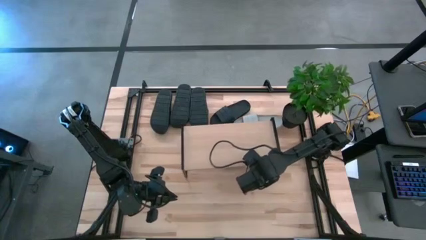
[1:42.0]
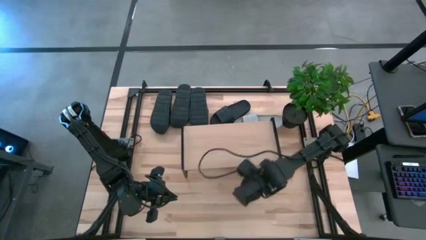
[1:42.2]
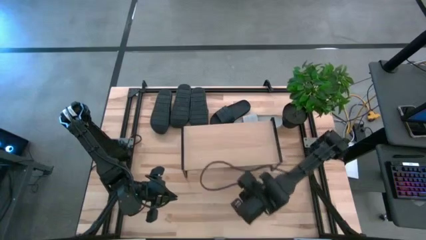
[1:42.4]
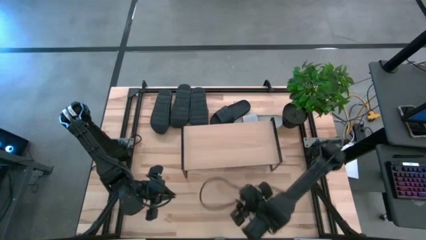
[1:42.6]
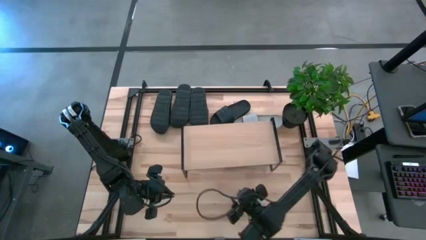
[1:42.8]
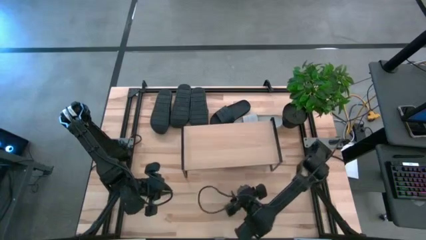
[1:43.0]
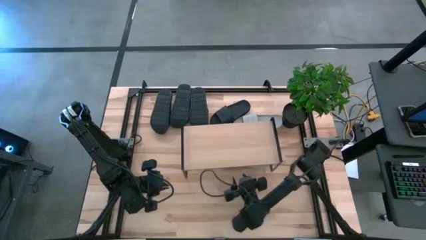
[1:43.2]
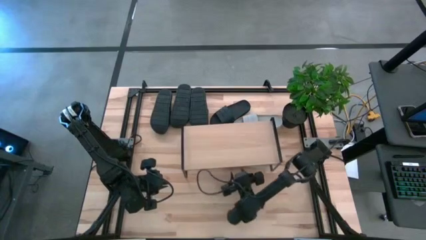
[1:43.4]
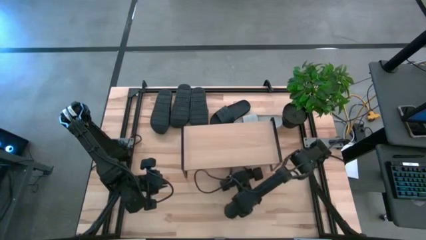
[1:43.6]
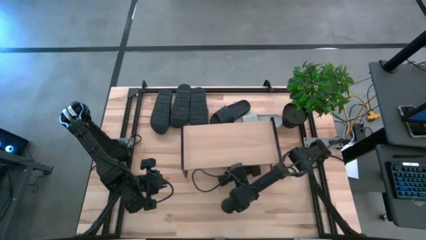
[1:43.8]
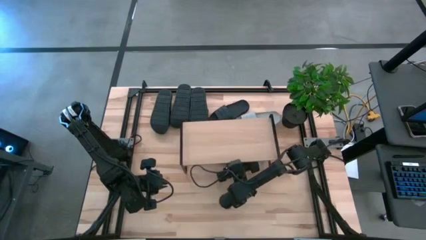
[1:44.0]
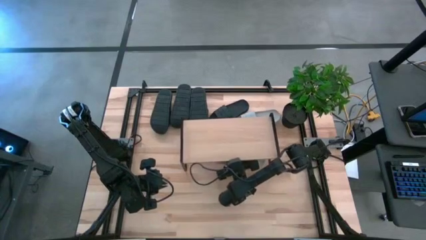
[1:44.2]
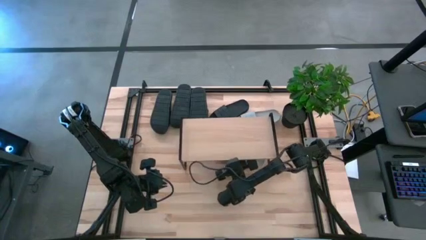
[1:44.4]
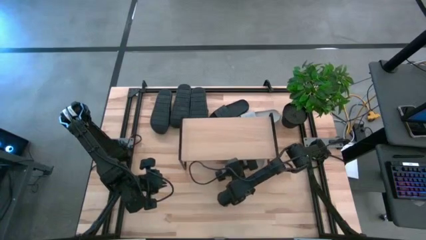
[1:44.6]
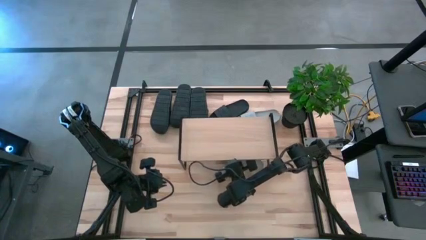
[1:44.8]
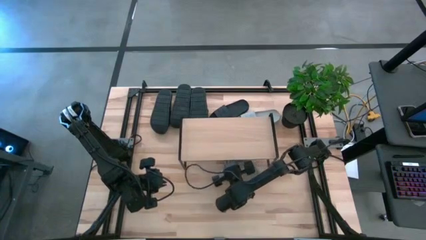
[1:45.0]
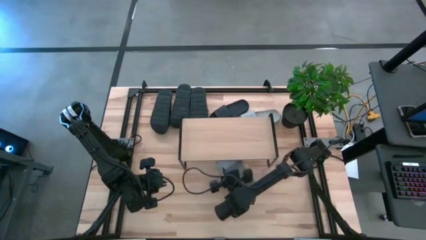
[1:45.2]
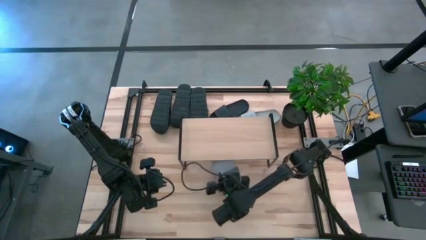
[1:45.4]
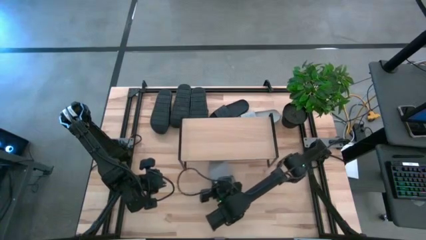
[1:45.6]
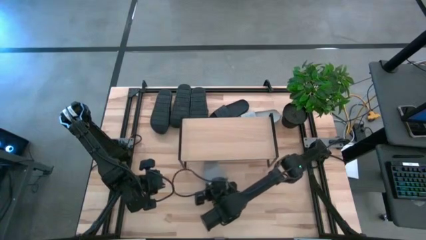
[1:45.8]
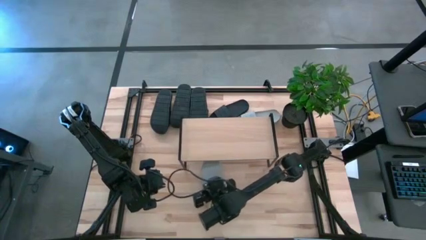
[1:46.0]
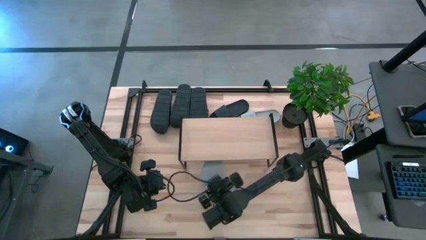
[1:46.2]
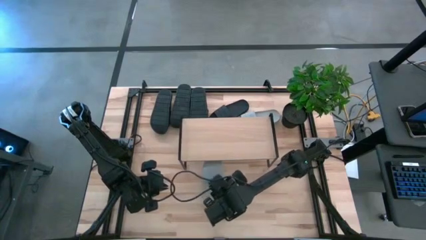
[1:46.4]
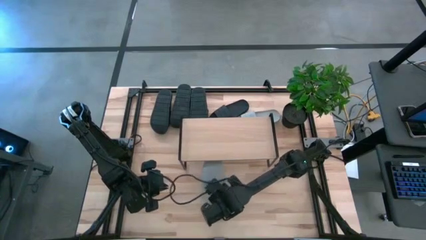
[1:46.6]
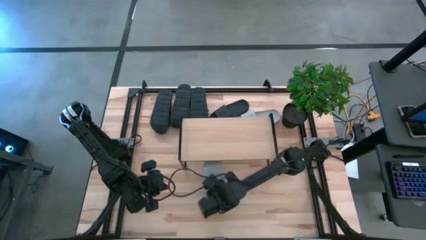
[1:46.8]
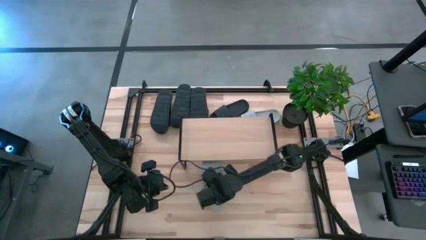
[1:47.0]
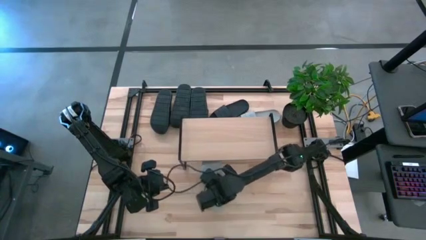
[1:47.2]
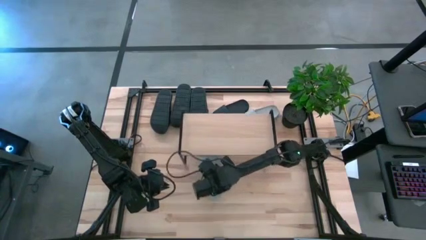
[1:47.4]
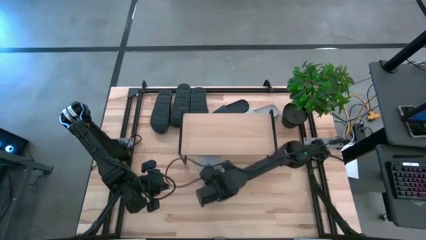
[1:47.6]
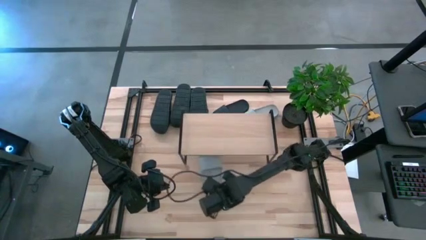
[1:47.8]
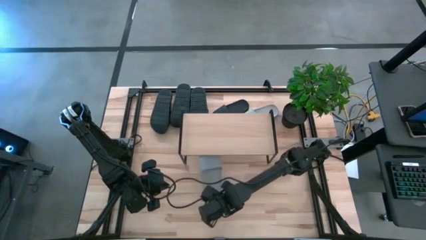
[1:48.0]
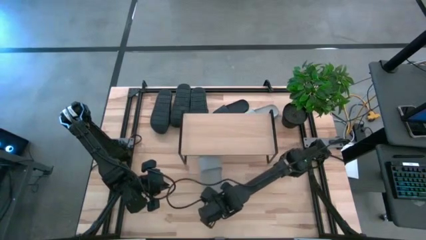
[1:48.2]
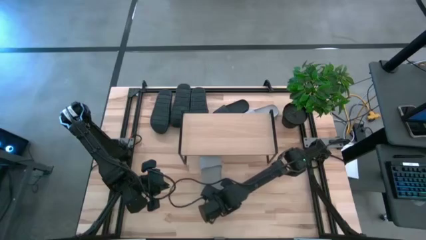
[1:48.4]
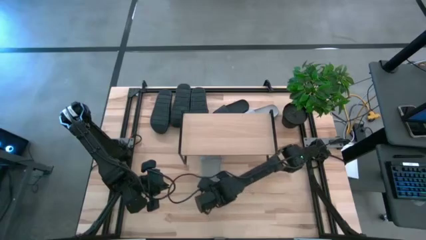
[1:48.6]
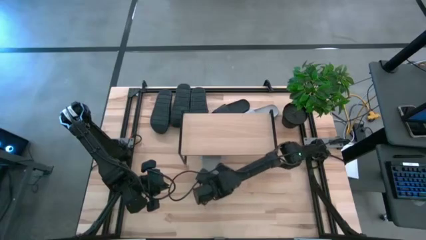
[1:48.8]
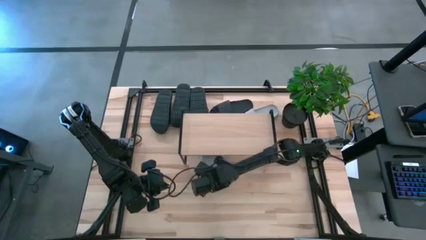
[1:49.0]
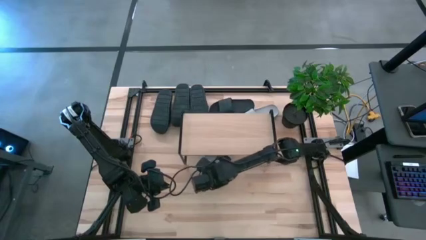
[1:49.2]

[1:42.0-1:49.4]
Task: Pick and place slides into the shelf
Put the gray slipper under the shelf

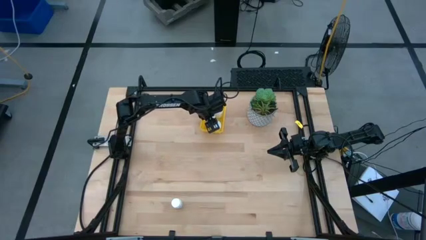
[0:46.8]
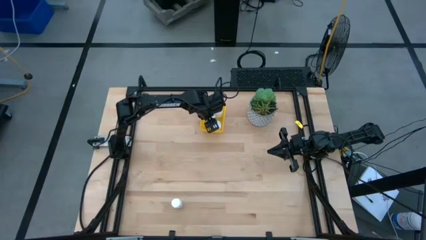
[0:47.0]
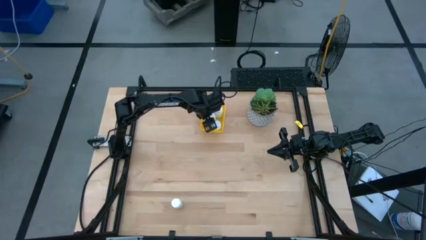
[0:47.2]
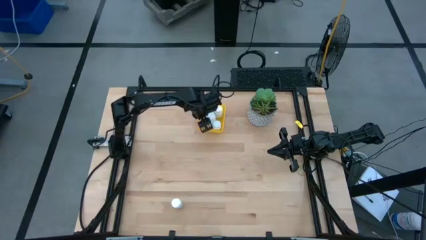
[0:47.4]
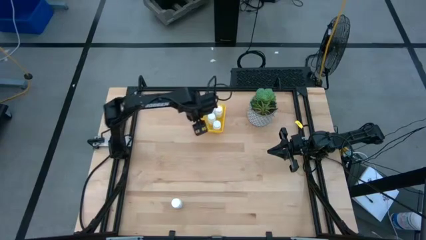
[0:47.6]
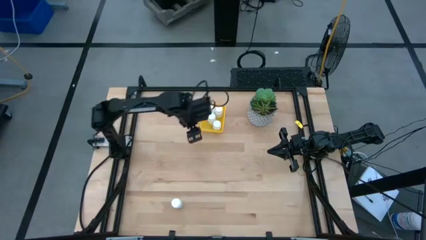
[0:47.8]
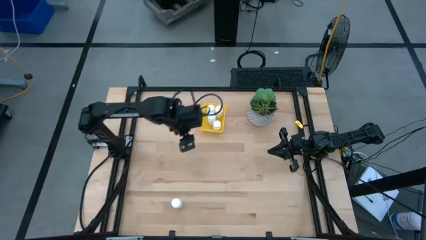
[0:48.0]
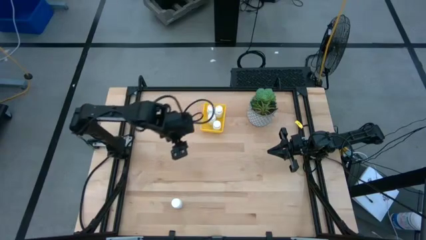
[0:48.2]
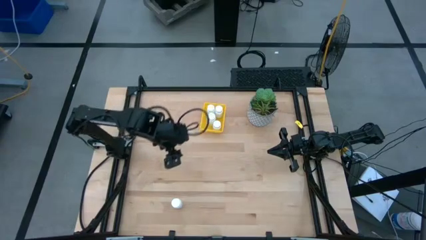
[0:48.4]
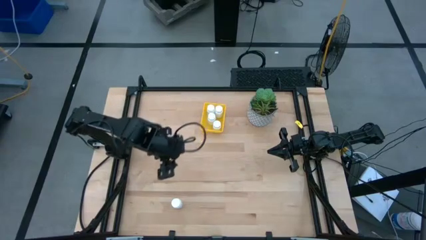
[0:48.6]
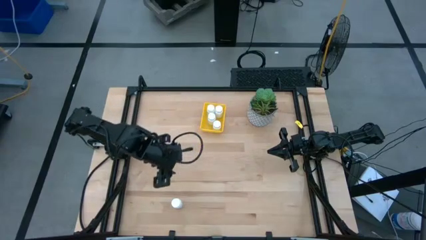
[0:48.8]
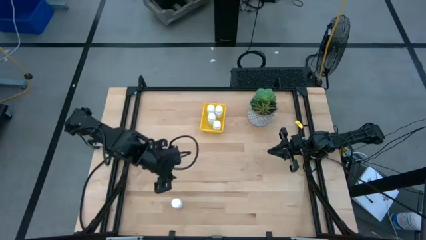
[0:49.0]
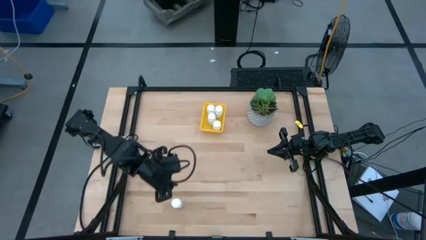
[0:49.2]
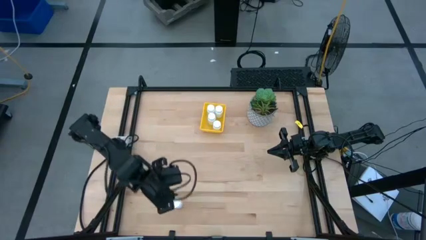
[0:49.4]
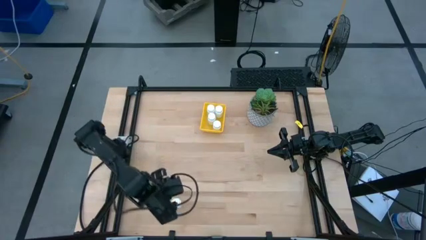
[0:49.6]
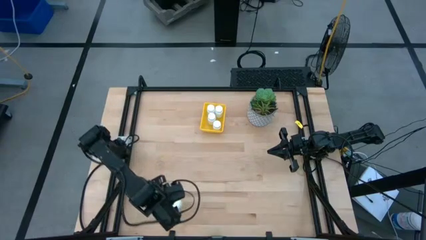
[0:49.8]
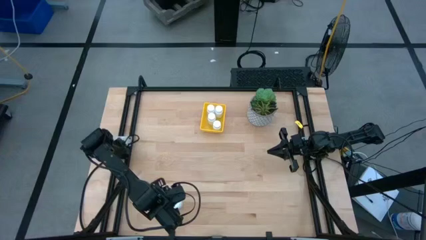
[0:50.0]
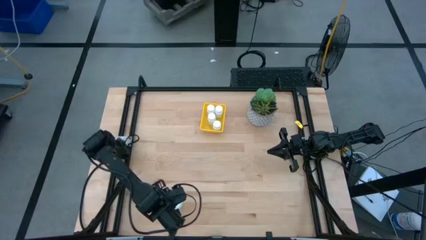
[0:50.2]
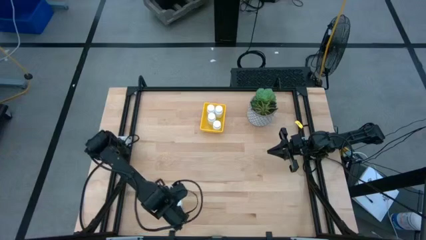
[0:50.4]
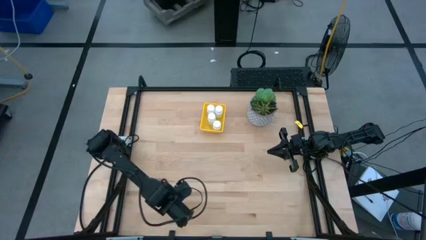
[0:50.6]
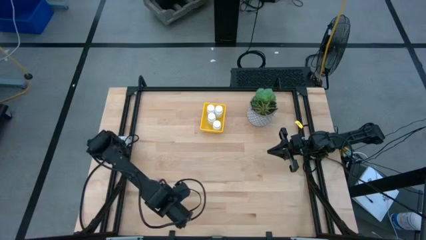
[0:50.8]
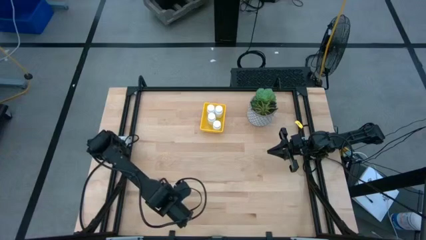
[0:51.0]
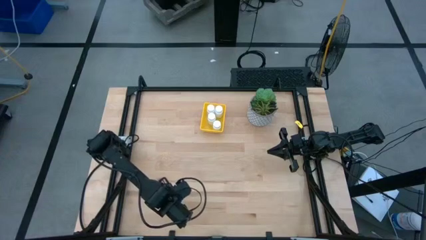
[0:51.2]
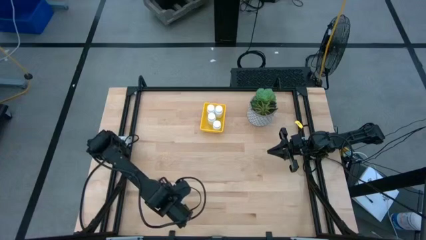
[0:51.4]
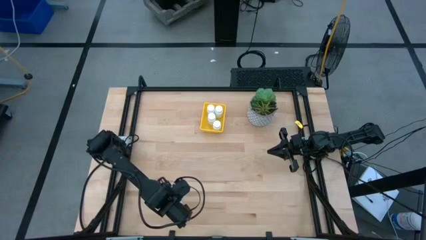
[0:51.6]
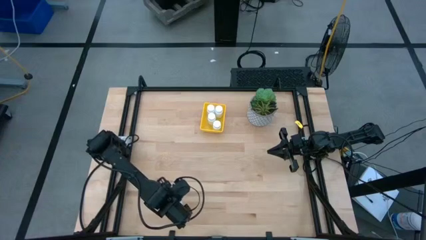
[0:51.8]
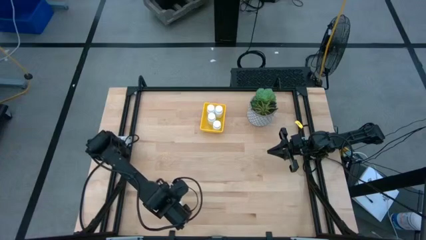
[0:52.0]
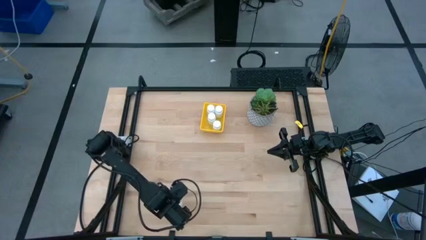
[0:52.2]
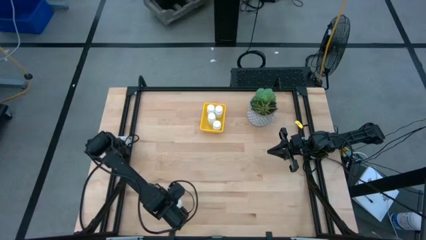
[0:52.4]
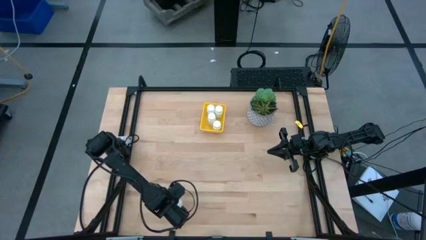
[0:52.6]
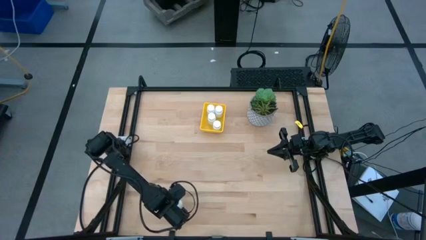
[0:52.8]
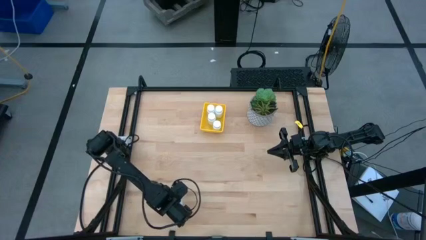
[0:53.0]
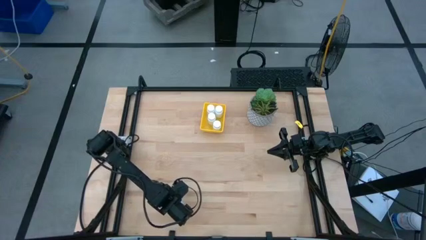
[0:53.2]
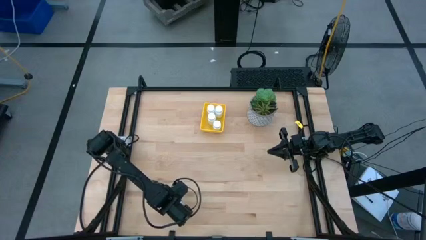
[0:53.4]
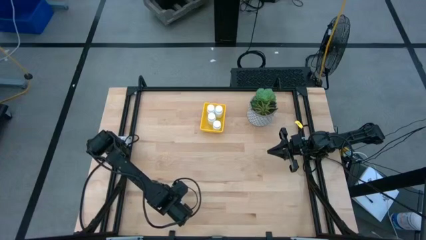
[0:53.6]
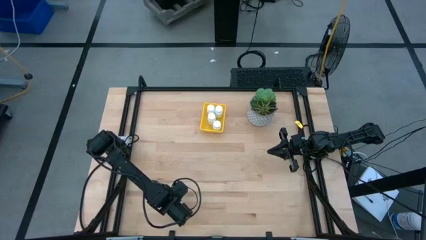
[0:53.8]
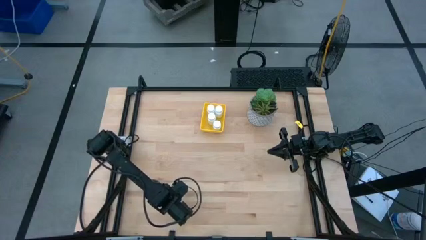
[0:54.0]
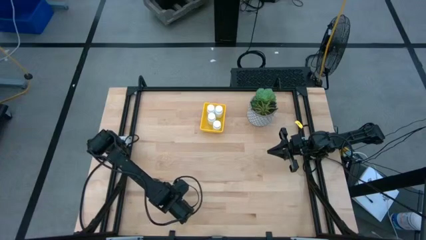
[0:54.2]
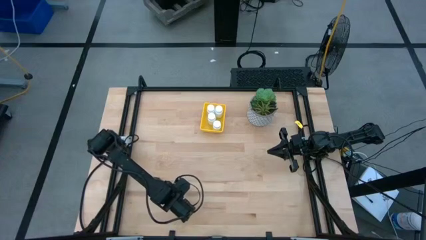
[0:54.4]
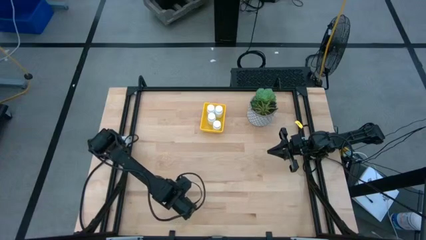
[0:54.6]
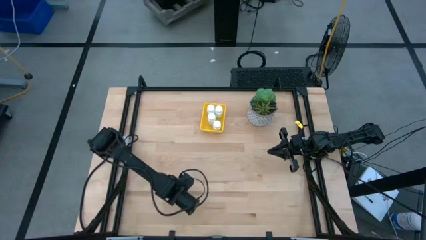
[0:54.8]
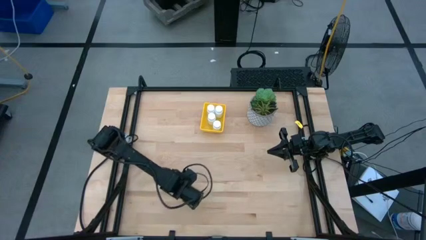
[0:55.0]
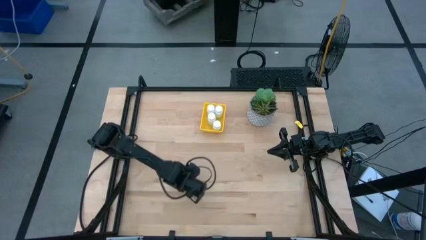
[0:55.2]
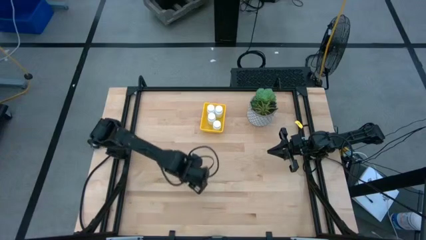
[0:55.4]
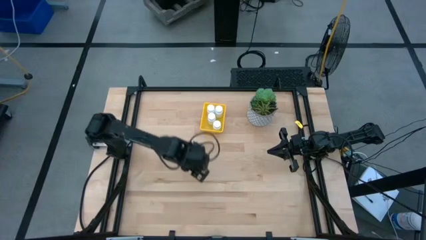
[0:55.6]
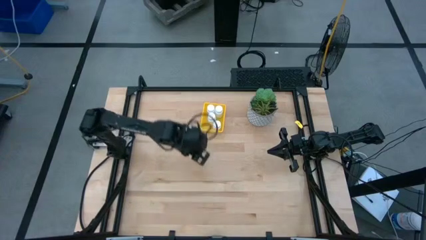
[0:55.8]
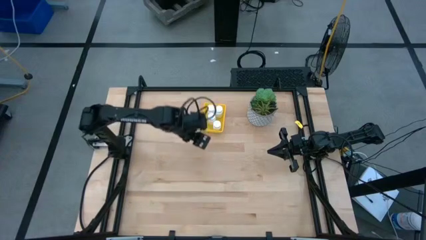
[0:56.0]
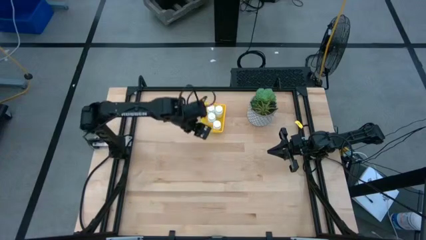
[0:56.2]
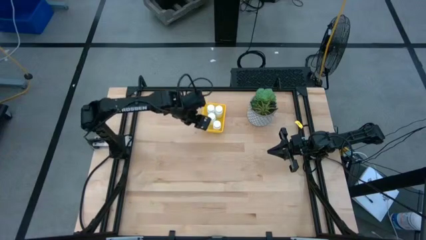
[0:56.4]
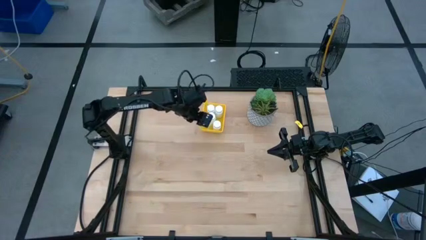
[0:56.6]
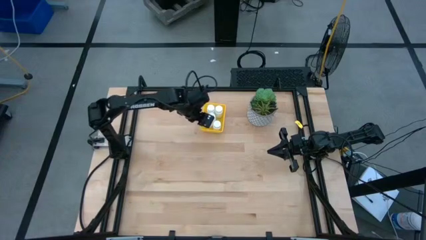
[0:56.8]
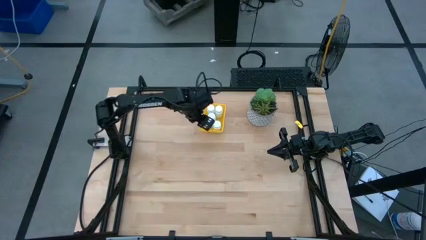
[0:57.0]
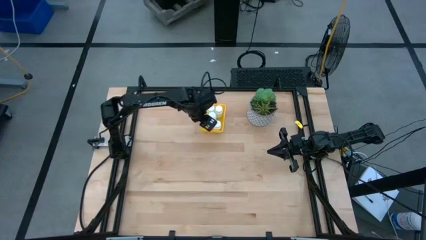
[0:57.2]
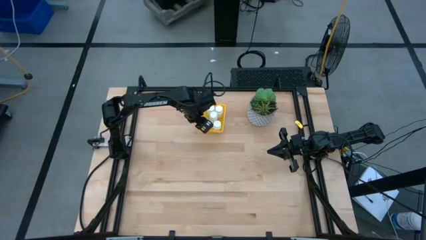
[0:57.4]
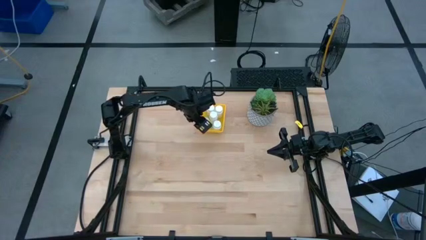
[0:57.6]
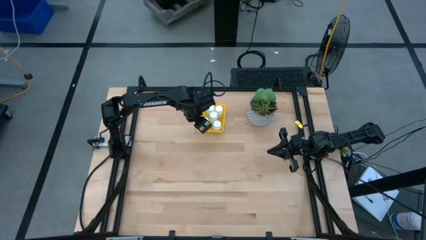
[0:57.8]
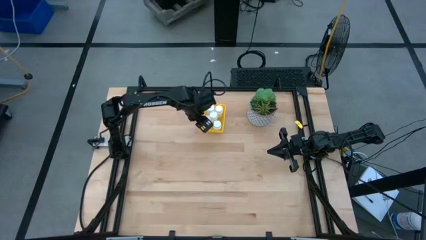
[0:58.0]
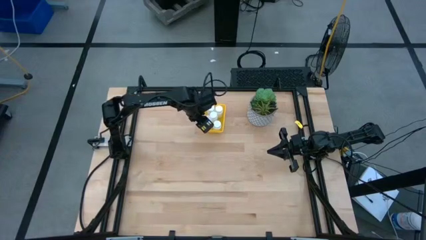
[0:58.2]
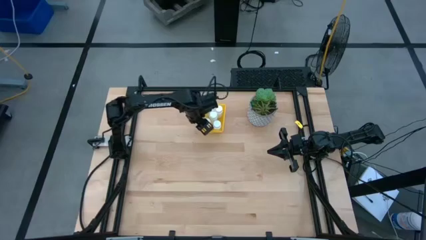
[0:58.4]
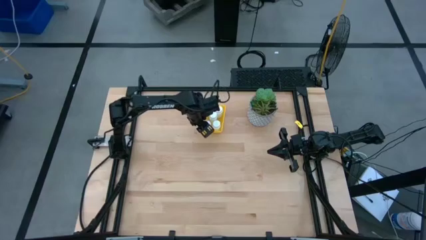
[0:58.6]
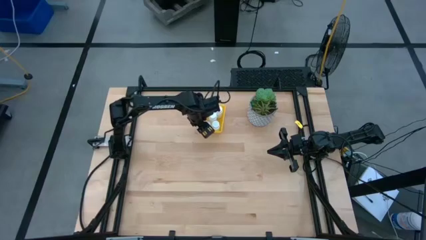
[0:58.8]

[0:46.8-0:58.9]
Task: Pick and place pill bottles into a basket
Put the white pill bottle into the yellow basket
